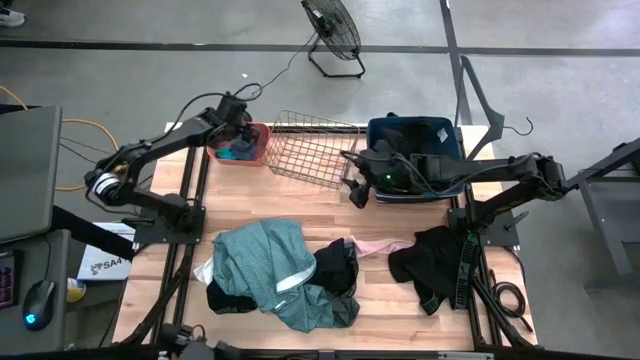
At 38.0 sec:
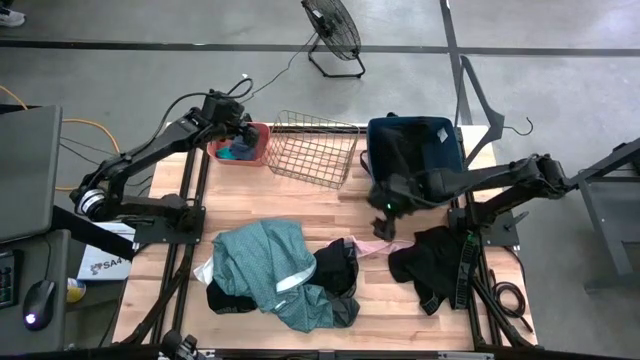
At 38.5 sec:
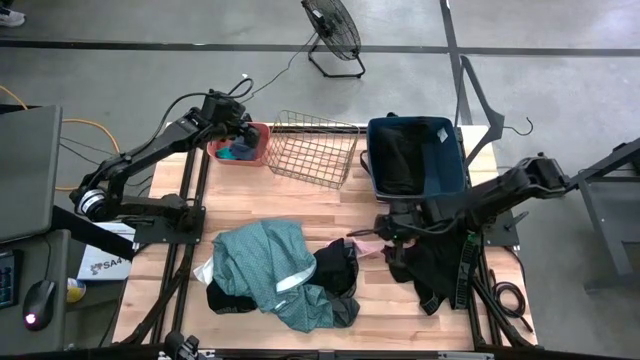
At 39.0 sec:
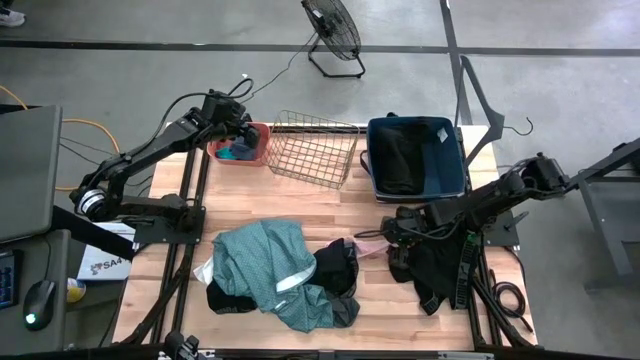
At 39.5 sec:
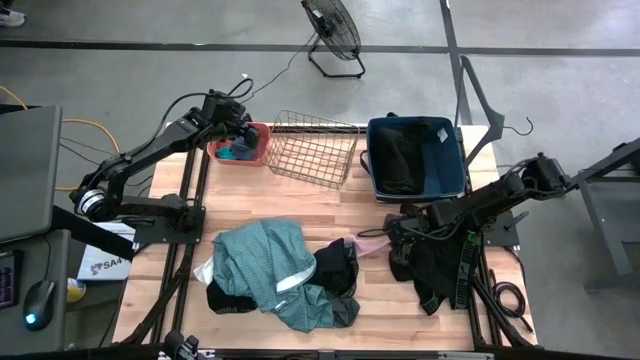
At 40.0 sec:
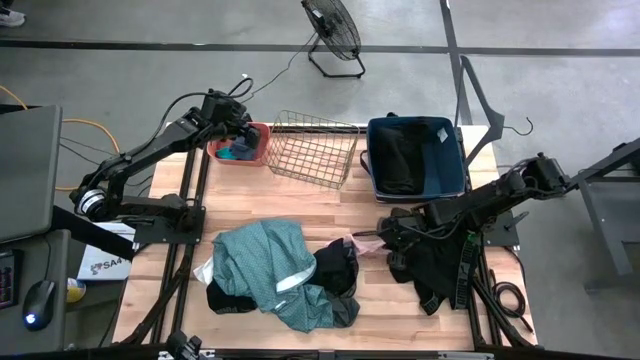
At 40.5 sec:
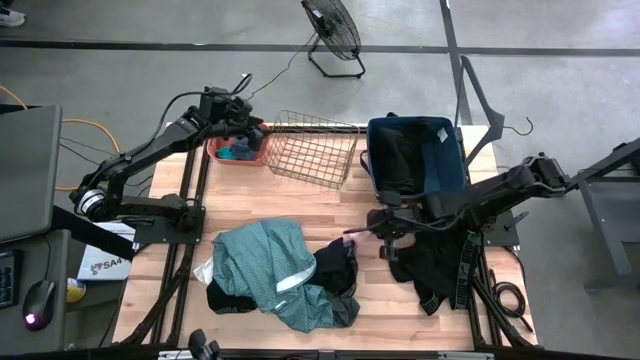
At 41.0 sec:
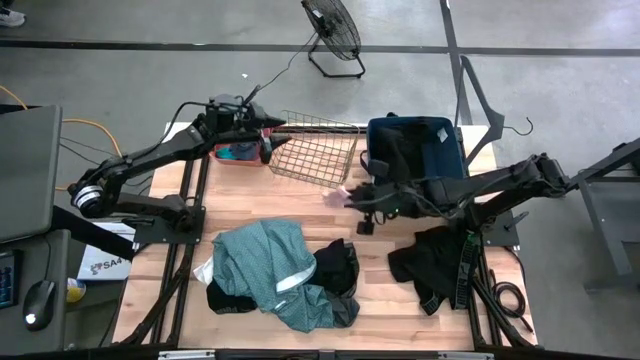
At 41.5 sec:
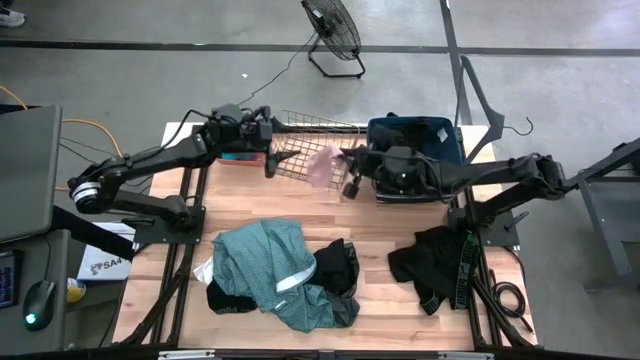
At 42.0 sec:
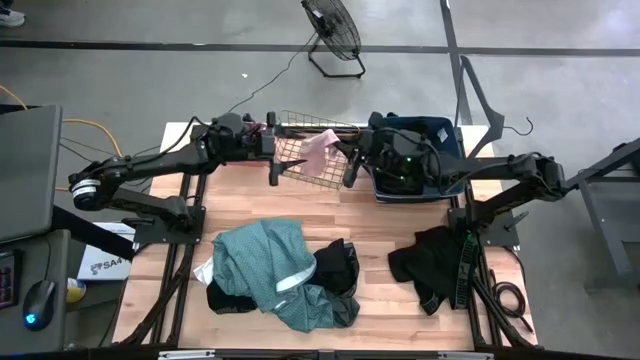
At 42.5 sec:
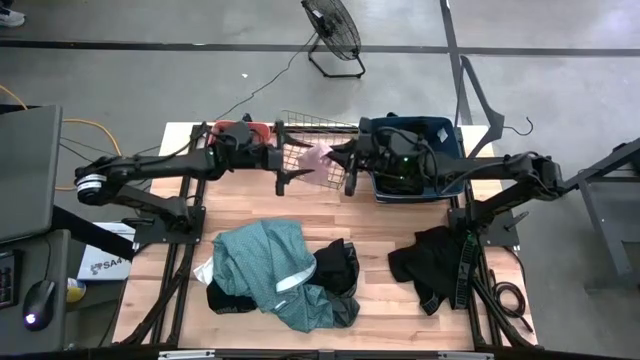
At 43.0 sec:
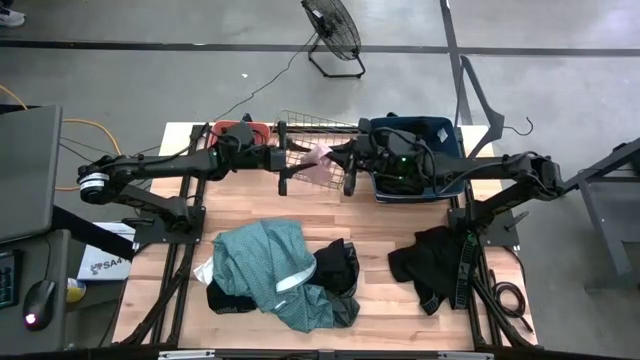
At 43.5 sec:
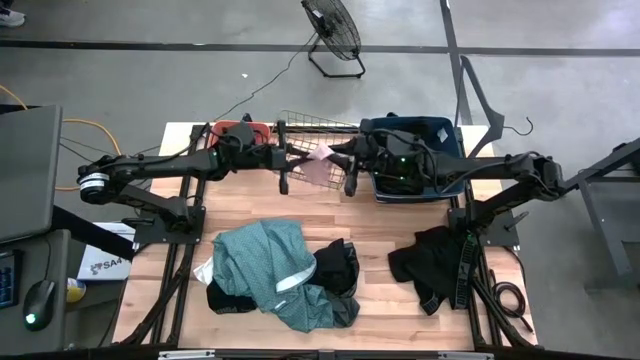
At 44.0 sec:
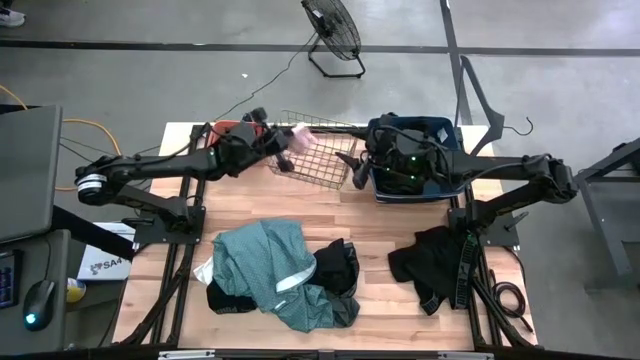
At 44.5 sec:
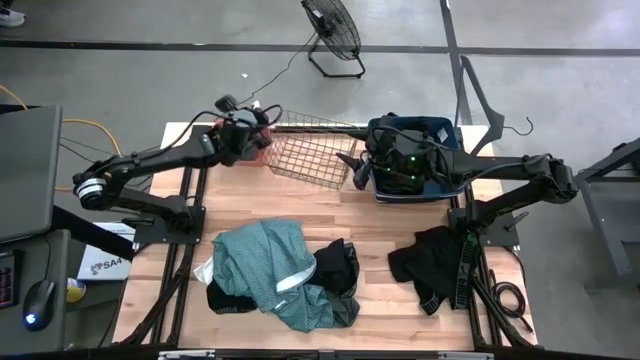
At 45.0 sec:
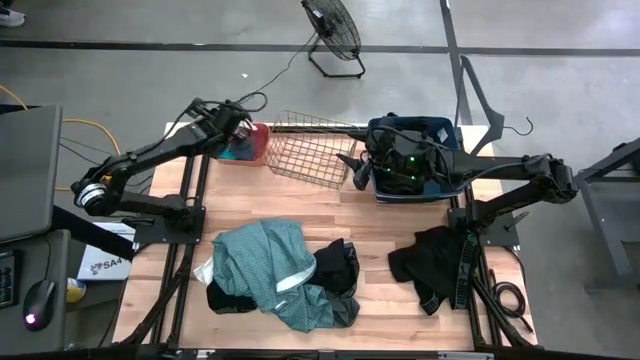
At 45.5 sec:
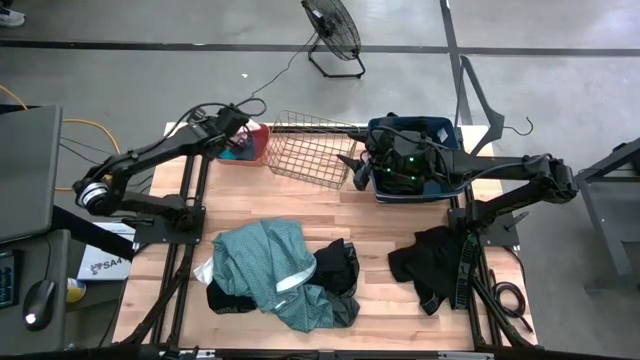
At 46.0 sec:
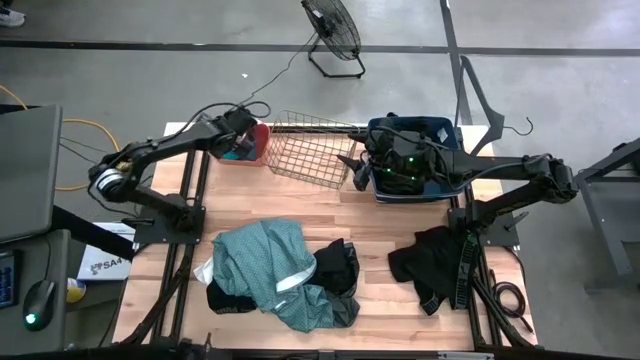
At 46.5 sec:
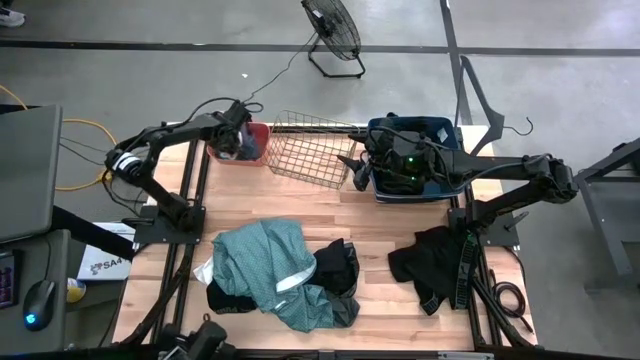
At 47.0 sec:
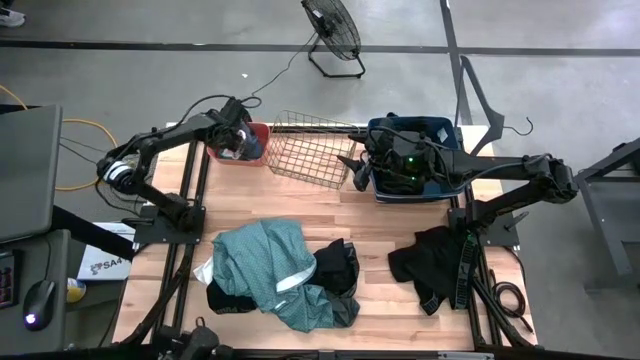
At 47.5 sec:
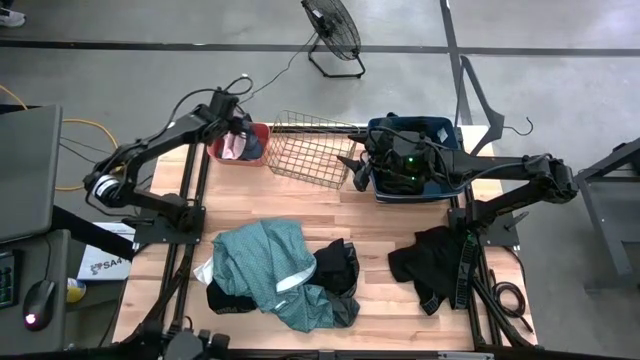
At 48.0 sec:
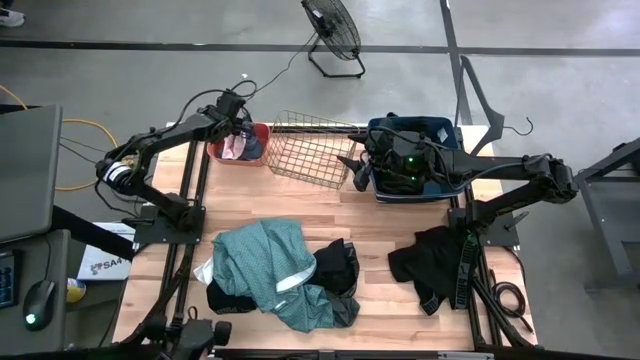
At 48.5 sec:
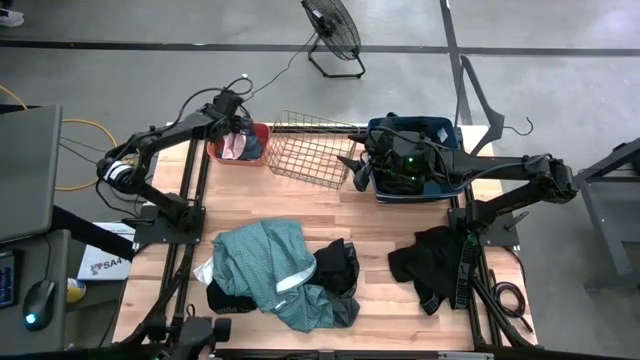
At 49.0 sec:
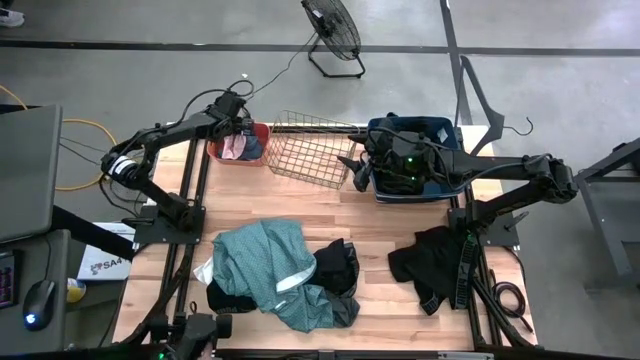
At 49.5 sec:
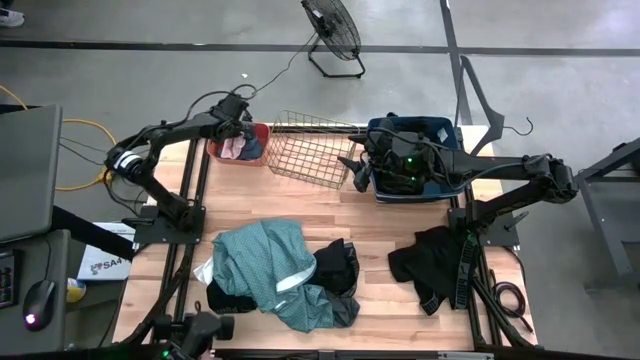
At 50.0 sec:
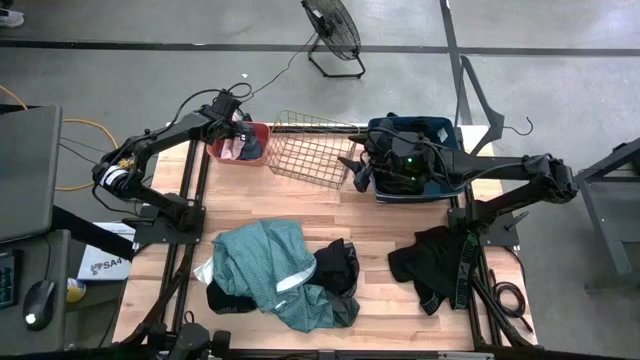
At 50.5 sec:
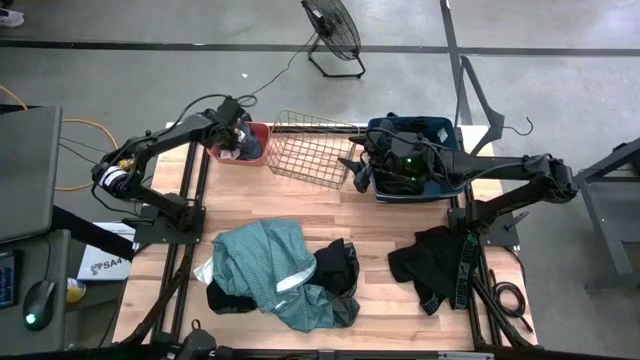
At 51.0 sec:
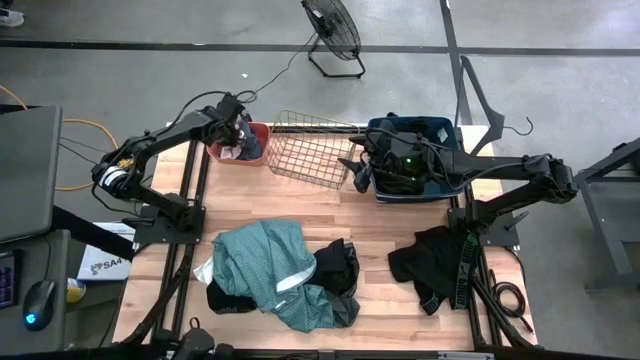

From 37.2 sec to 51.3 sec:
Task: Pick & Place Cloths
Put the light pink sock into the orange bin

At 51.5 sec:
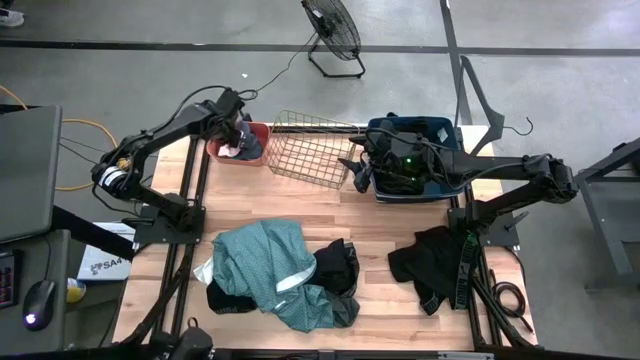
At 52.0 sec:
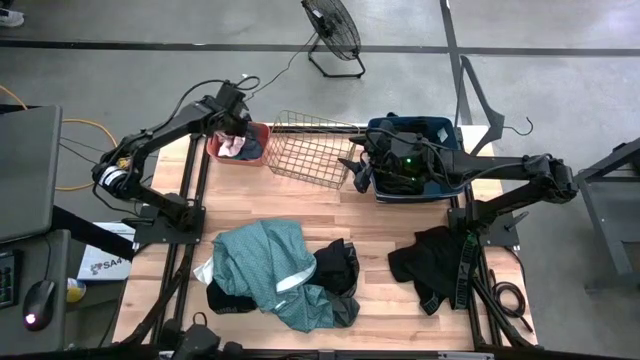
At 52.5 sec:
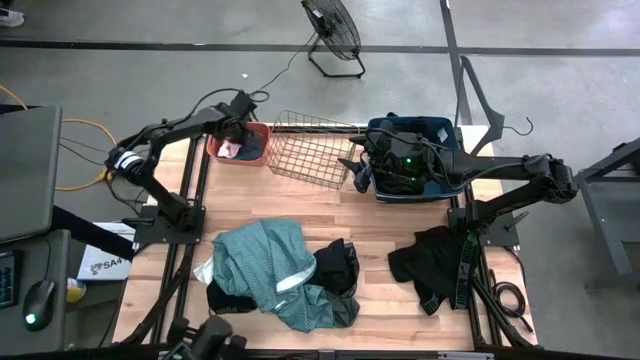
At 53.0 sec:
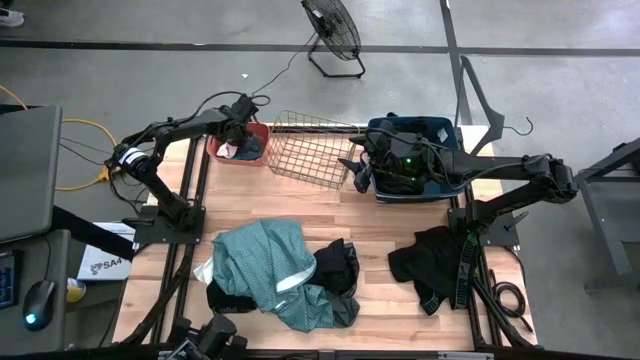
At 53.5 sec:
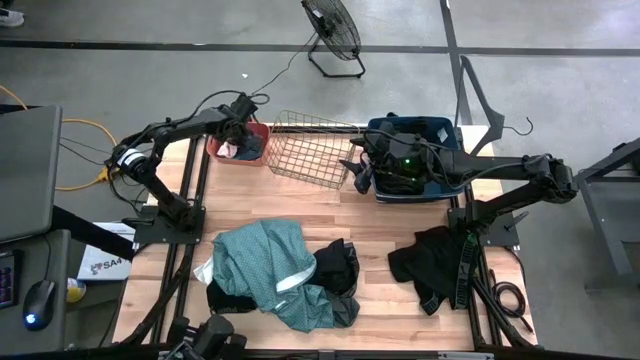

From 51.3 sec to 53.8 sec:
Adjust the violet sock in the orange bin

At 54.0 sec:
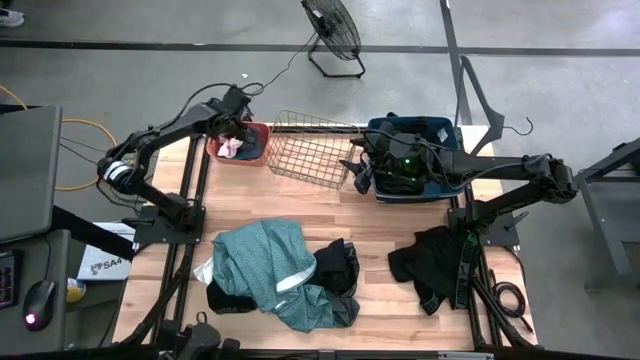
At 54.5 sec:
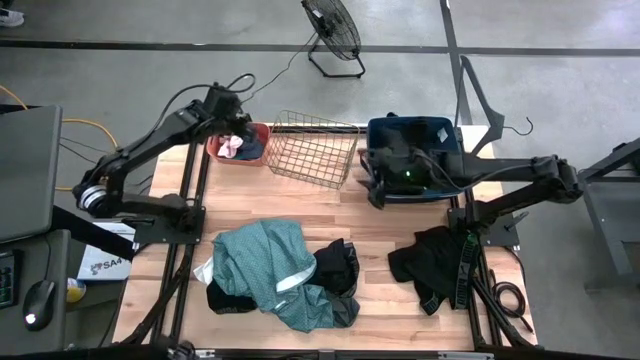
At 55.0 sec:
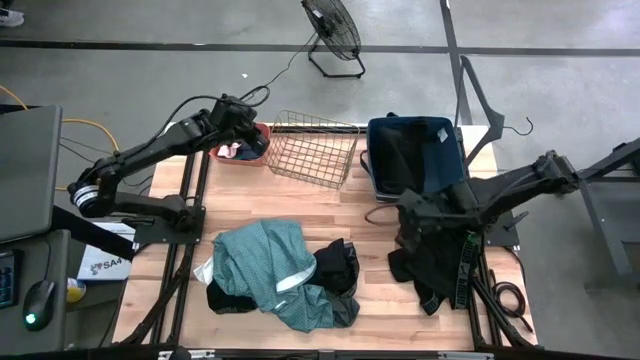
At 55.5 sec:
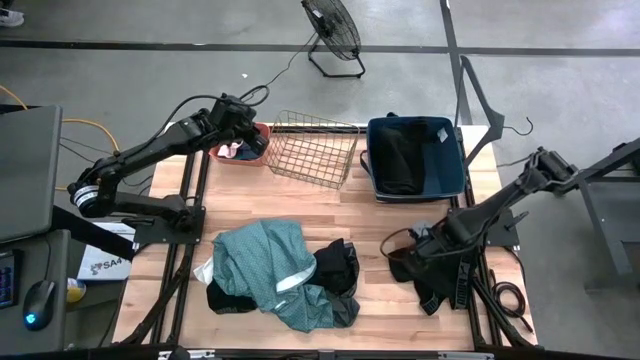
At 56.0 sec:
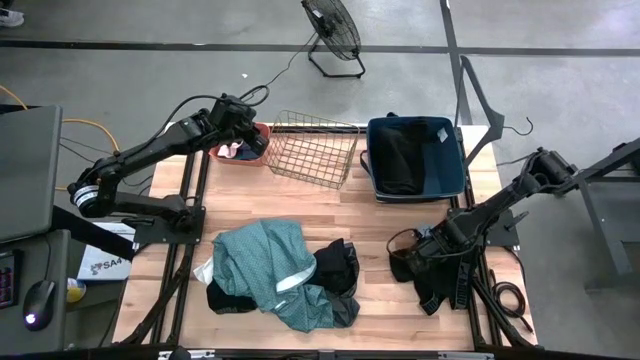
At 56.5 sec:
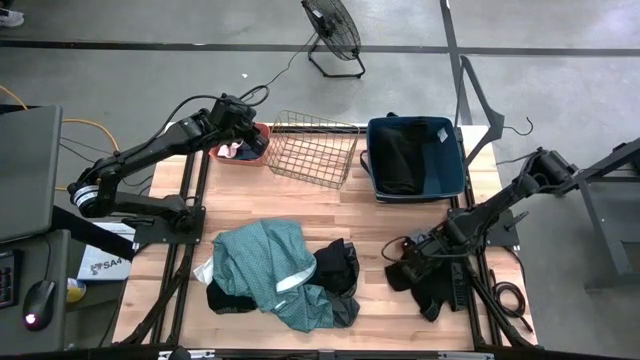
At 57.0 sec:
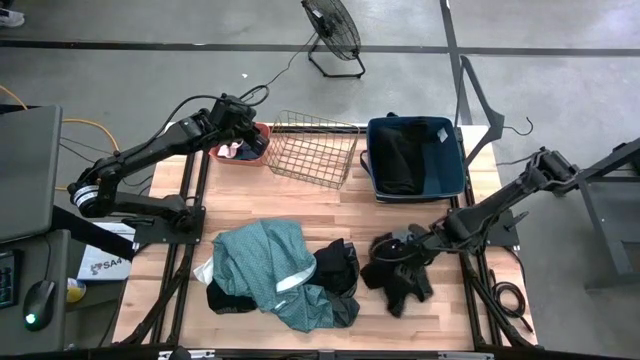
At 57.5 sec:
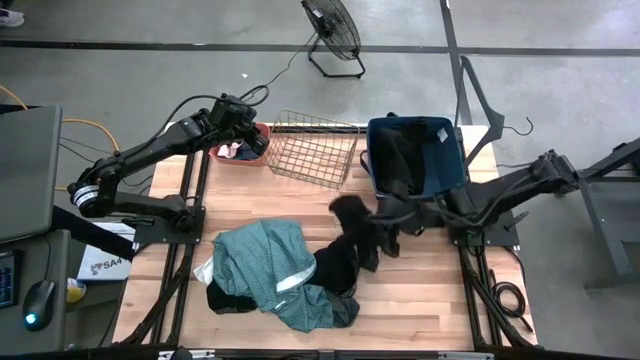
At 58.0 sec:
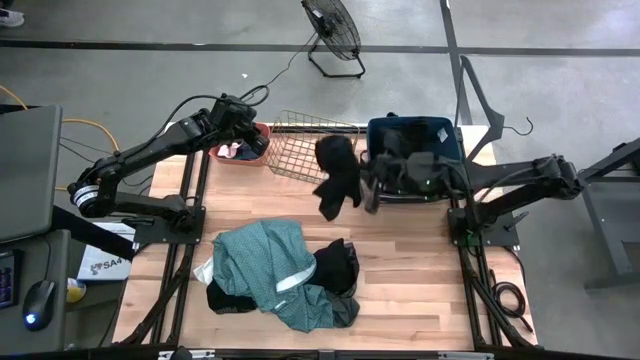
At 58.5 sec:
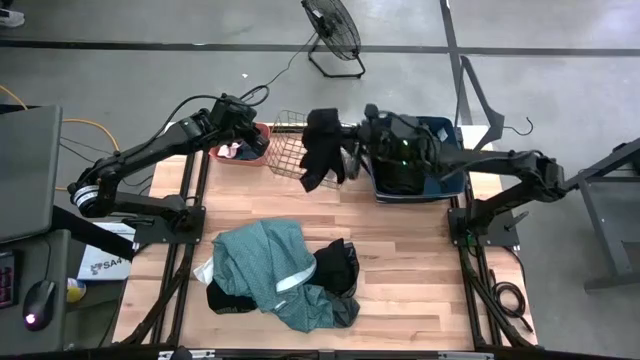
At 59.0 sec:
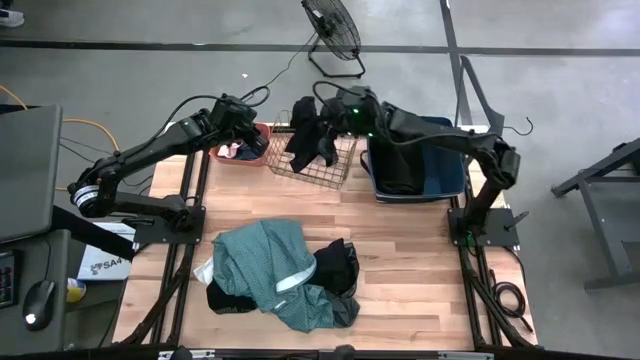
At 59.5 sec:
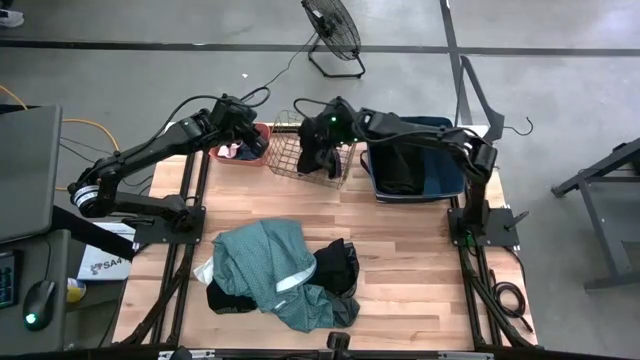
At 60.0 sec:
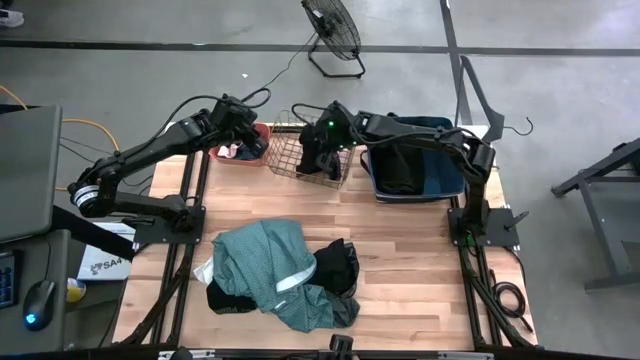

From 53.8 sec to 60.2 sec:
Put the right black boxer into the gold wire basket
